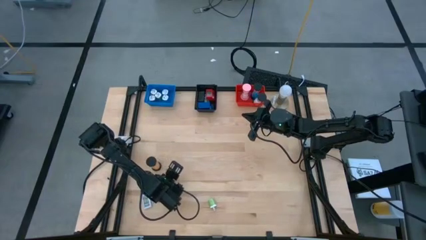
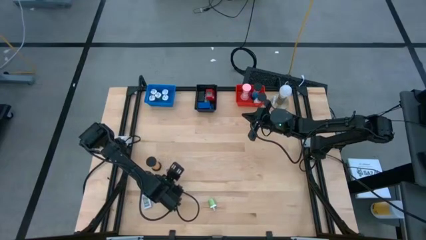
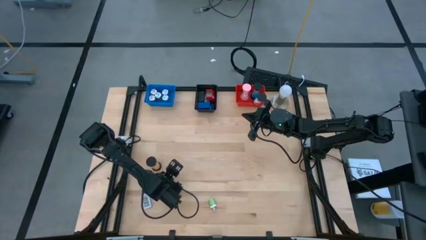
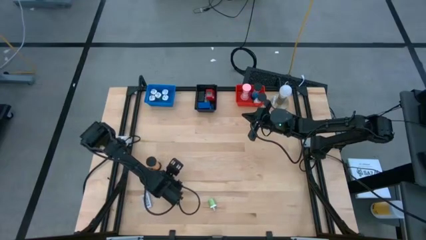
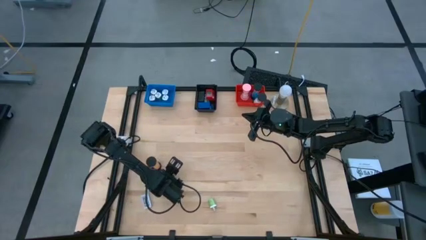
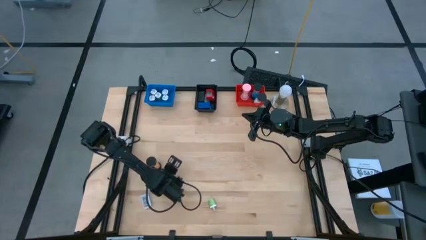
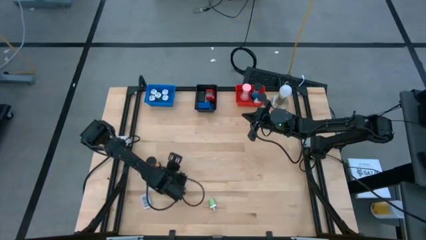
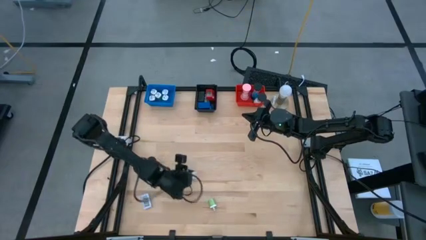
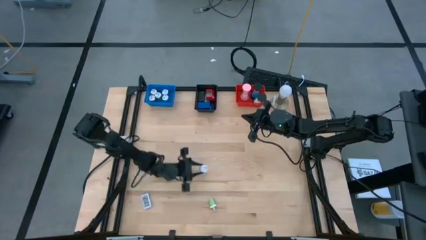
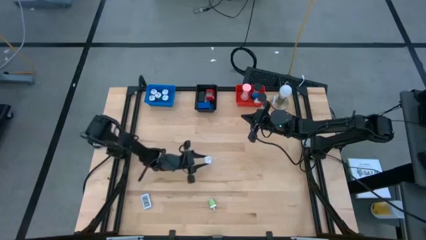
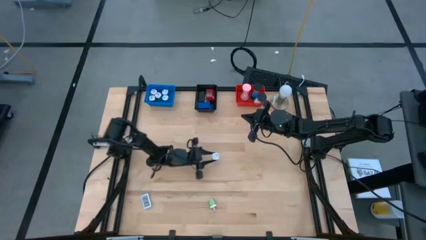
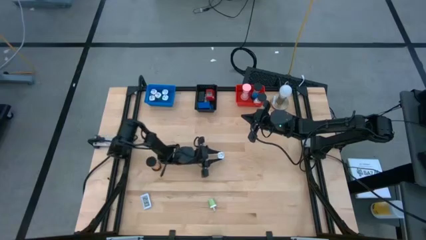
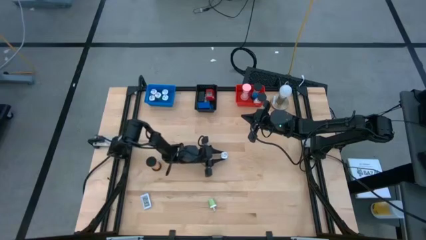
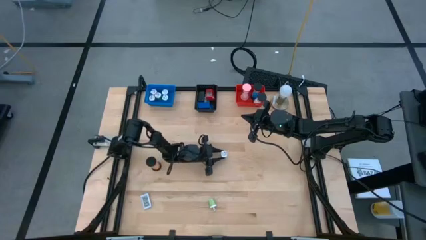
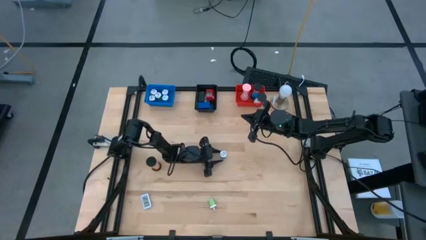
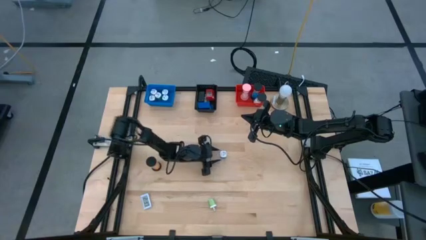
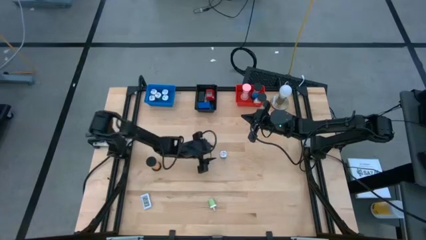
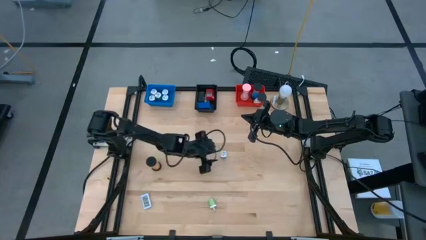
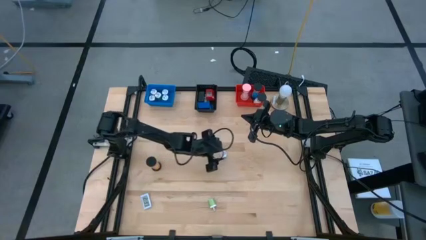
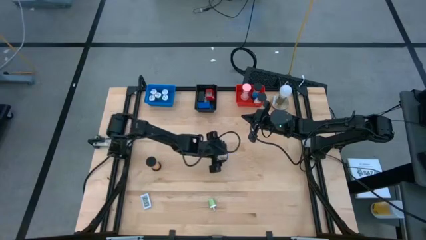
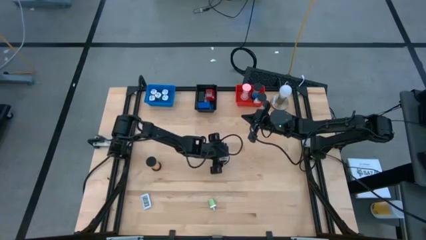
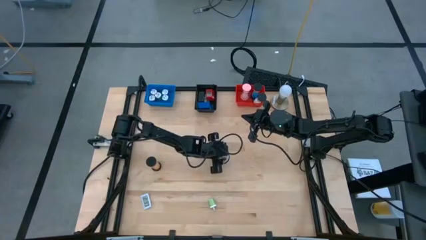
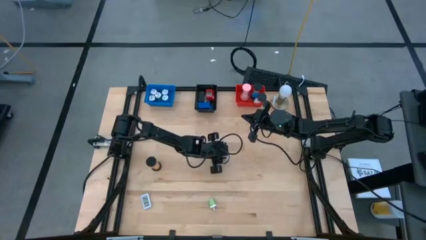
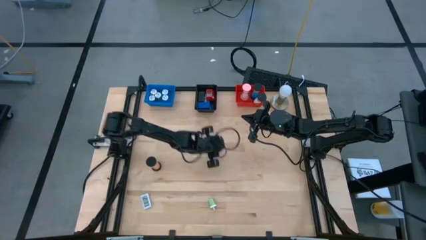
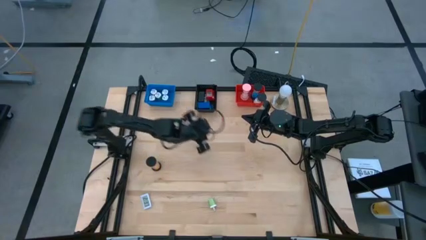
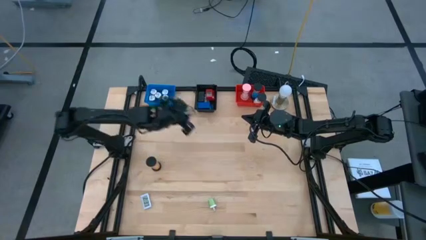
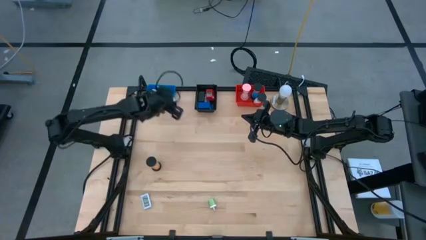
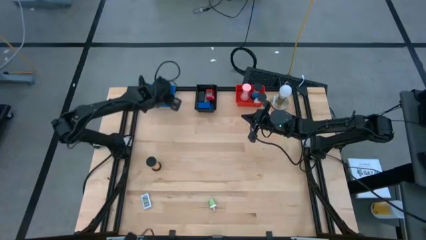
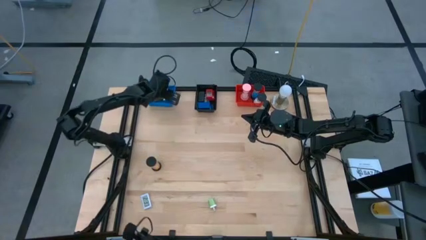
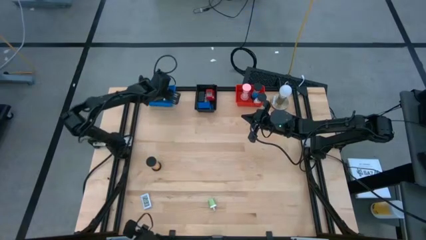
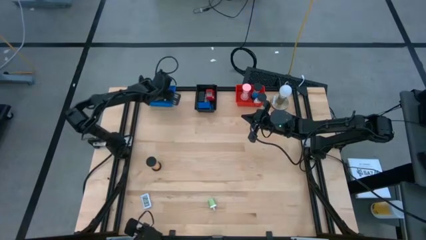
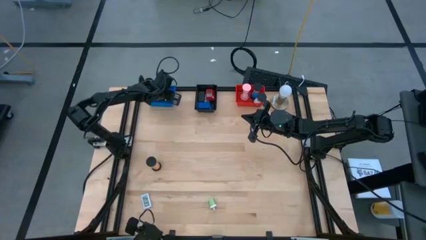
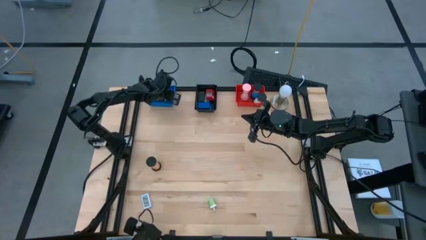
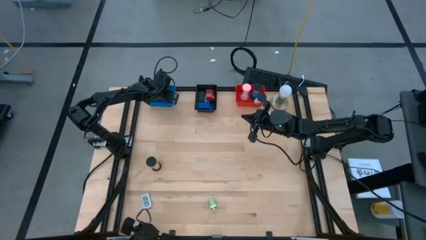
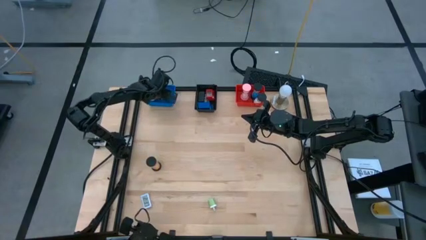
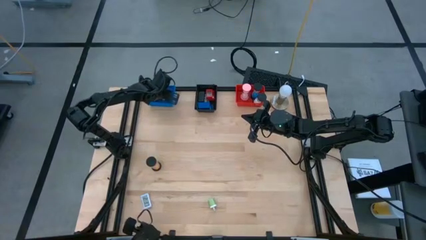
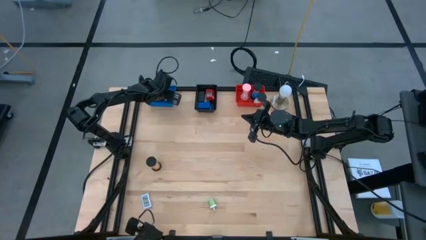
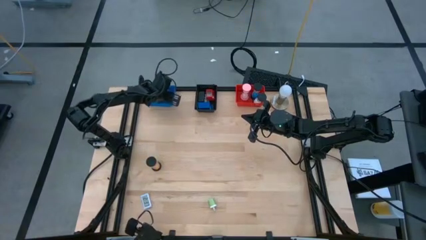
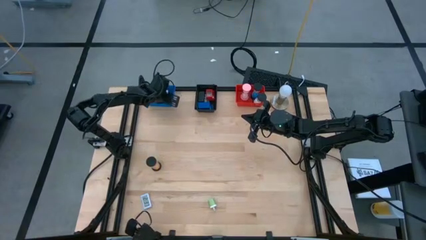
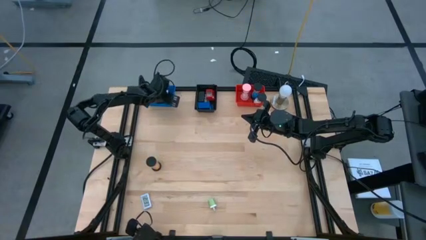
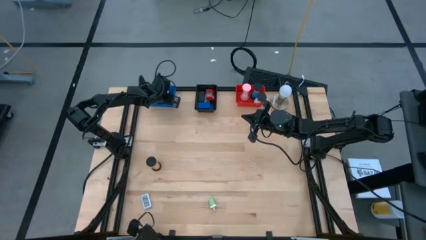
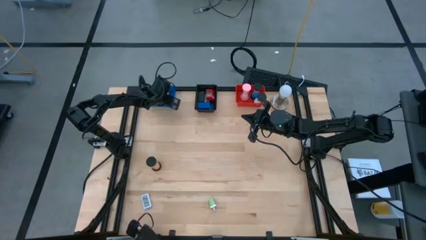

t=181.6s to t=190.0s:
Task: Pick & Place Office items
Put the purple charger adapter into the blue bin

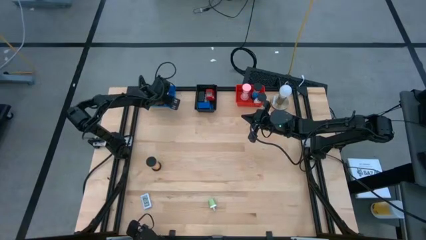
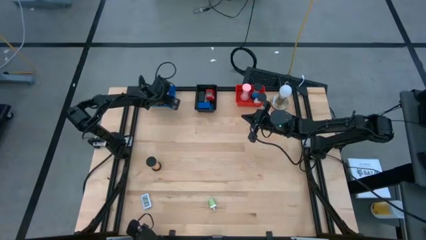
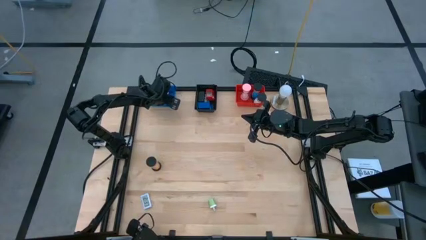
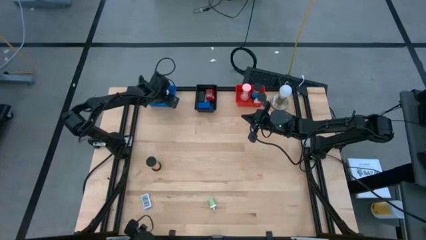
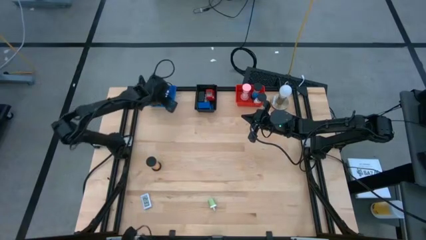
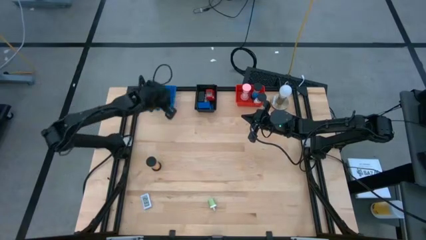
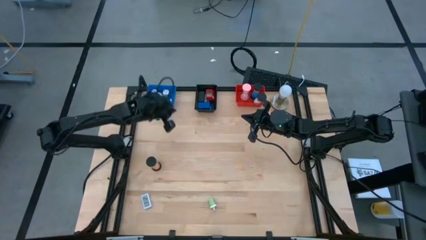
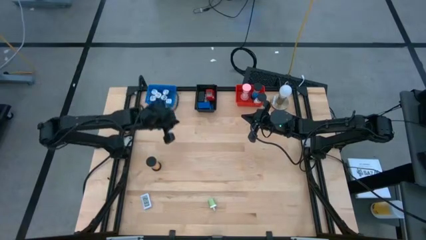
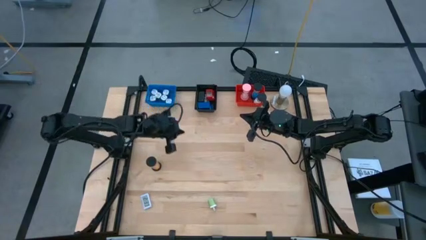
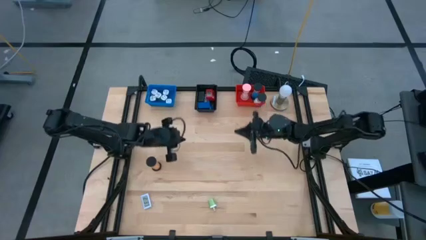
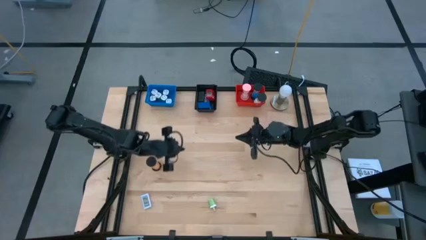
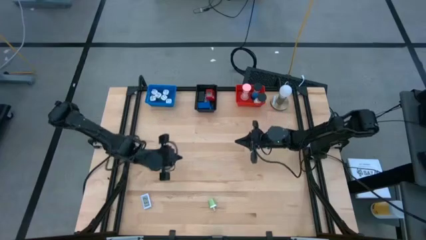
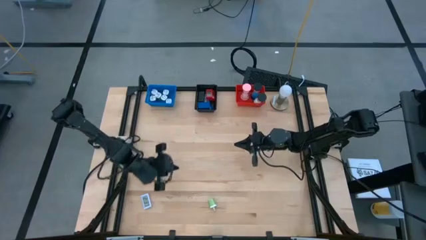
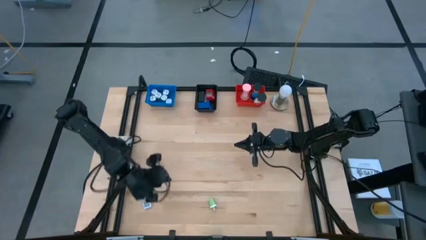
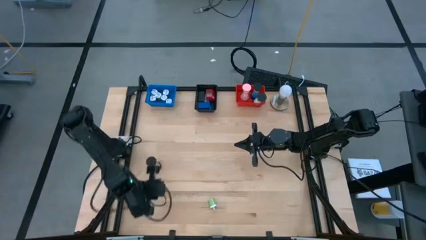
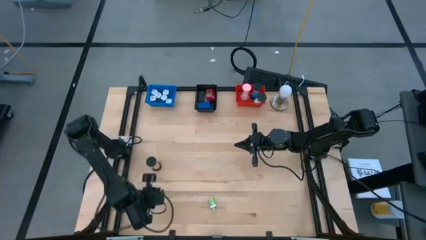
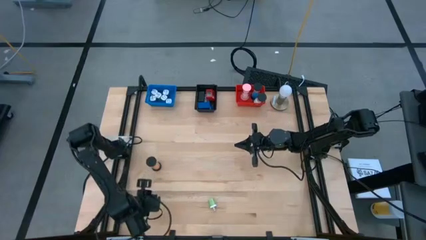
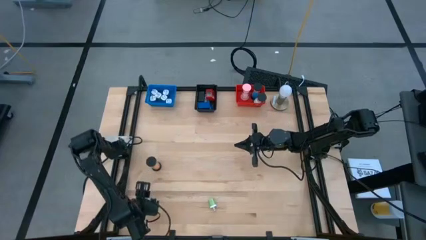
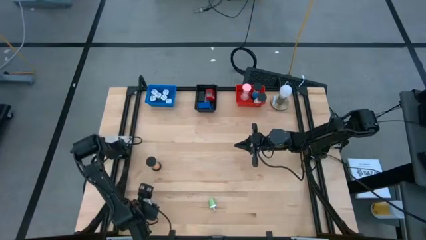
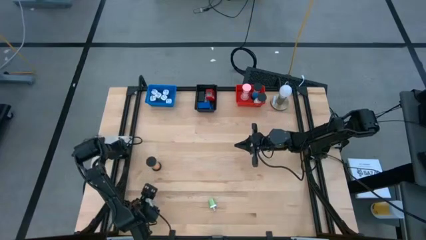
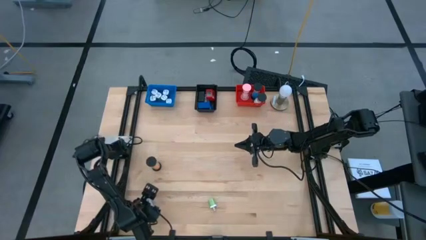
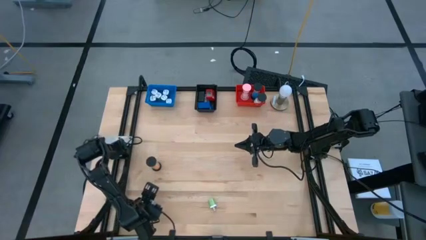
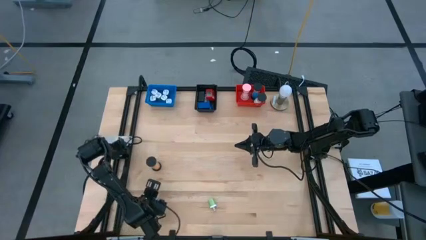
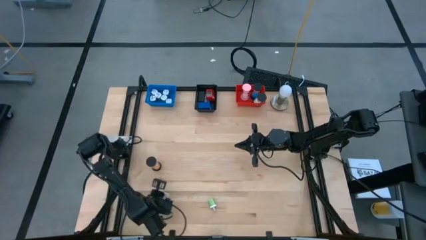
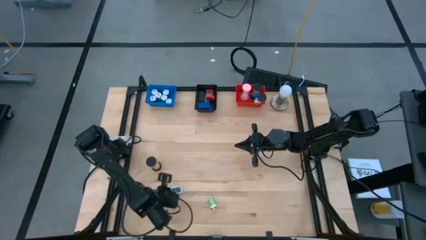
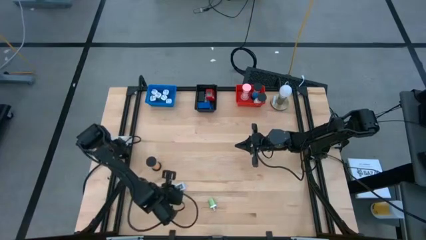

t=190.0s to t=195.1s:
Put the white digital clock into the black bin

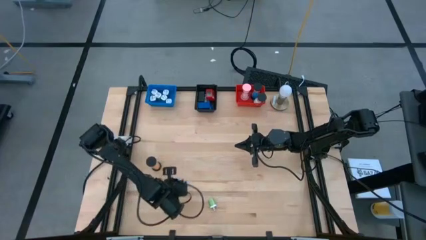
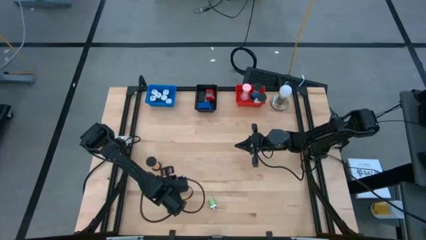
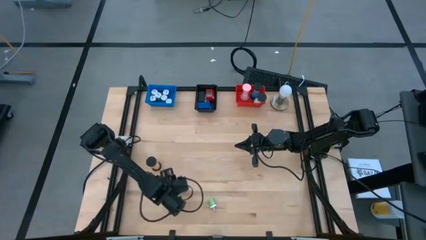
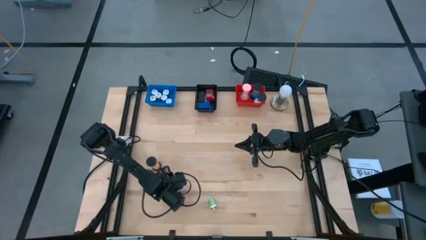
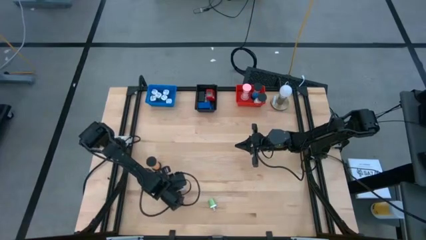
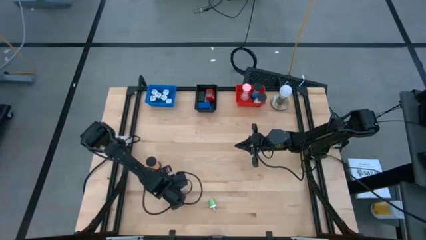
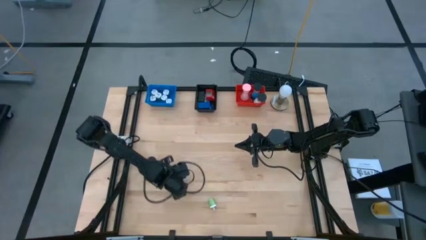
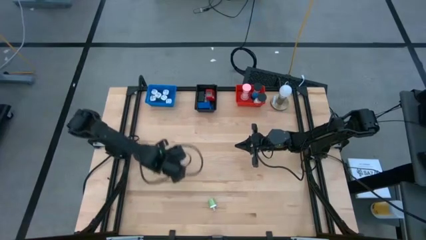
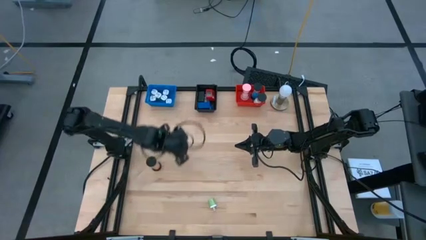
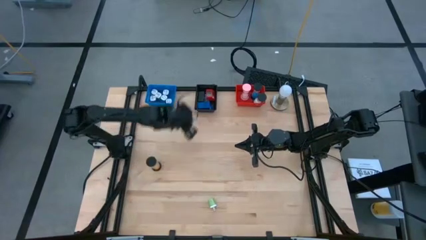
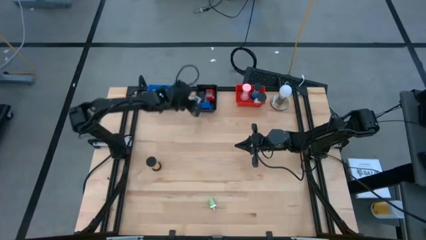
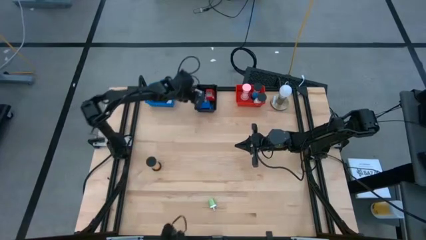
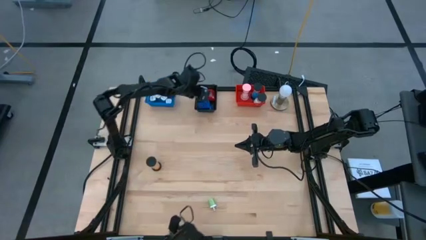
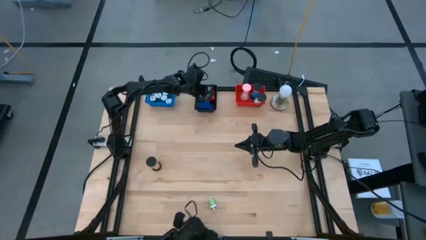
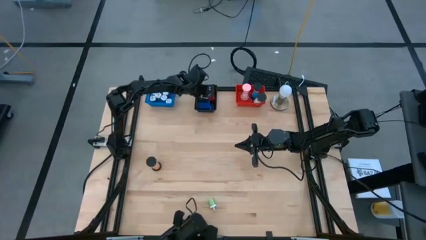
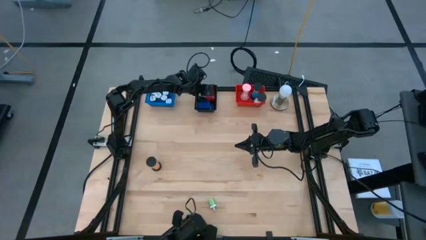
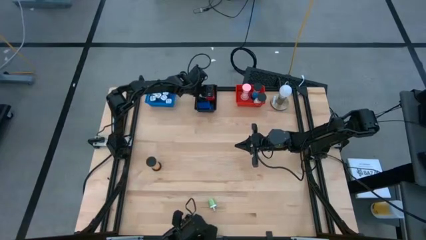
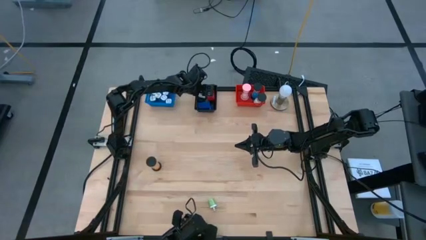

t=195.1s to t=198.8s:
Put the white digital clock into the black bin
